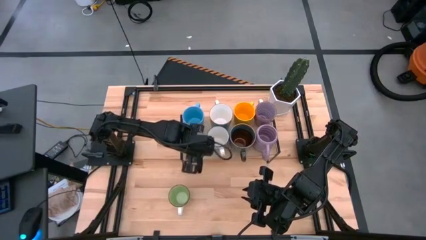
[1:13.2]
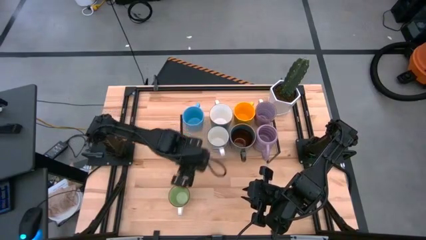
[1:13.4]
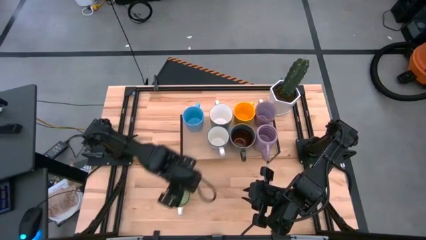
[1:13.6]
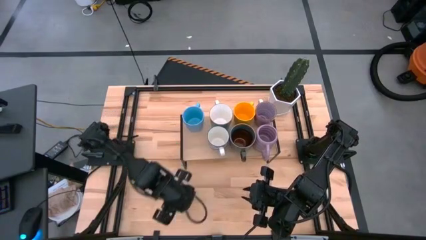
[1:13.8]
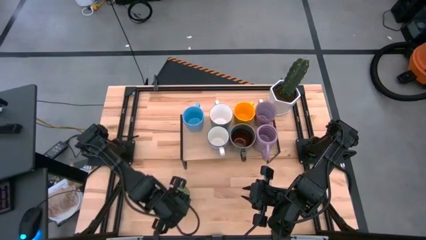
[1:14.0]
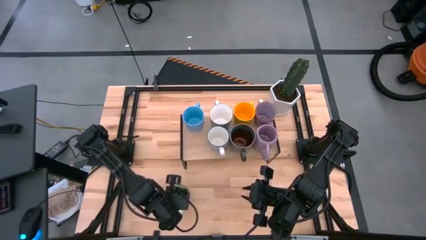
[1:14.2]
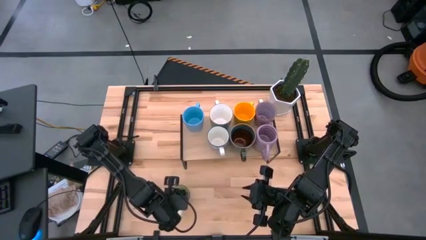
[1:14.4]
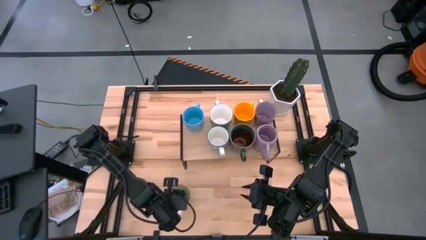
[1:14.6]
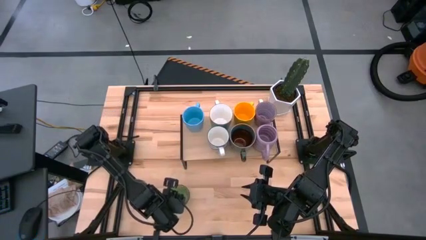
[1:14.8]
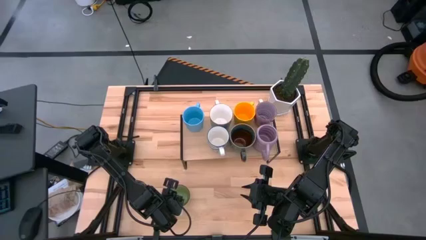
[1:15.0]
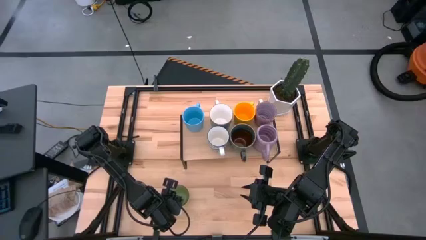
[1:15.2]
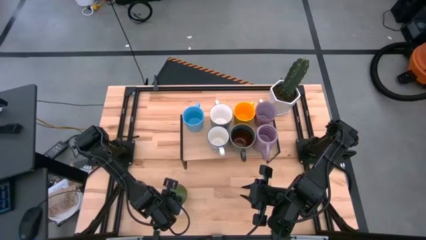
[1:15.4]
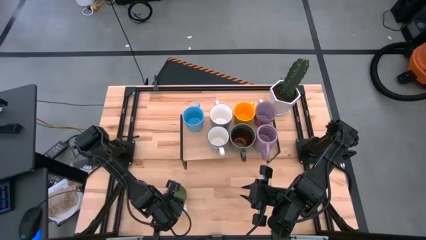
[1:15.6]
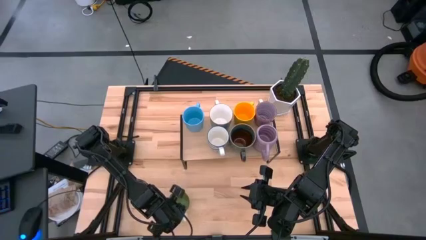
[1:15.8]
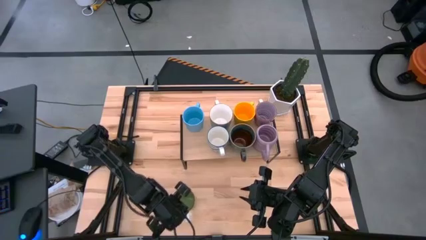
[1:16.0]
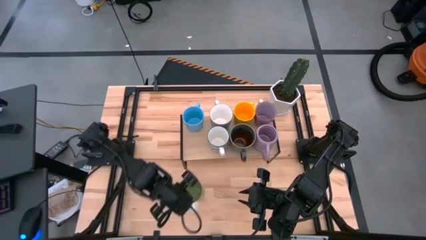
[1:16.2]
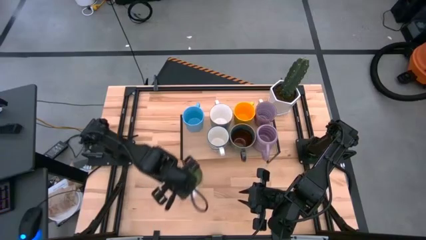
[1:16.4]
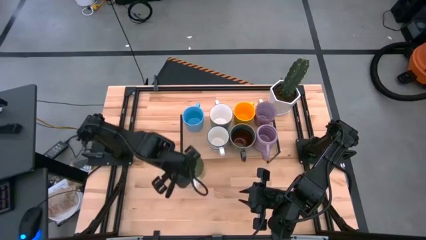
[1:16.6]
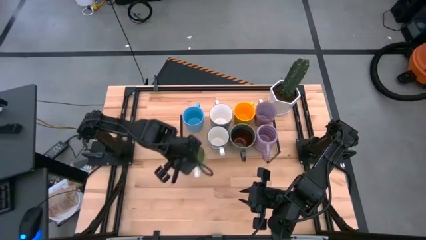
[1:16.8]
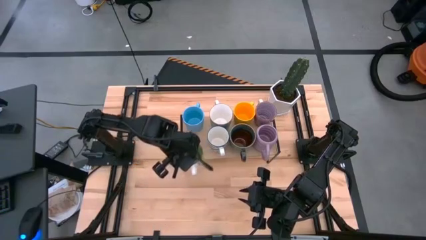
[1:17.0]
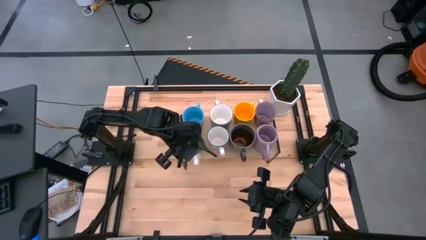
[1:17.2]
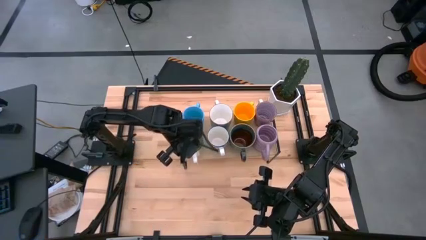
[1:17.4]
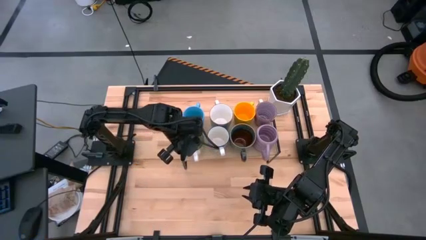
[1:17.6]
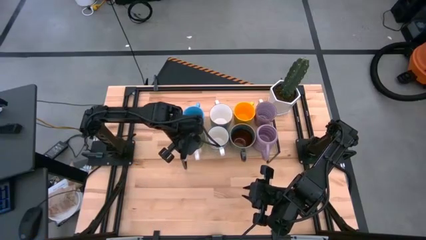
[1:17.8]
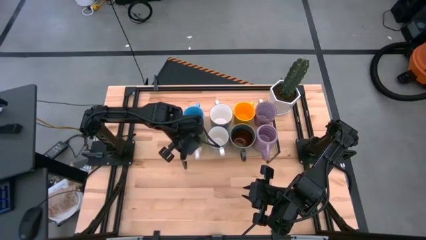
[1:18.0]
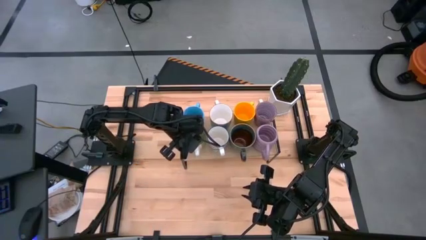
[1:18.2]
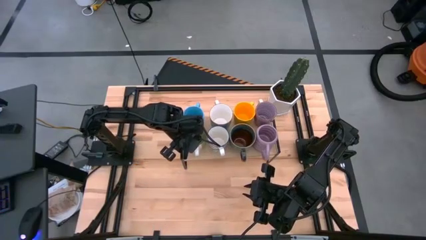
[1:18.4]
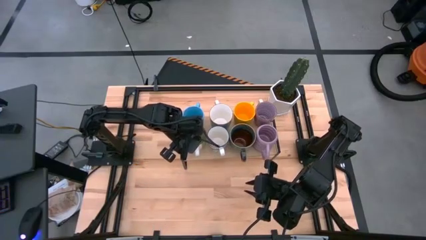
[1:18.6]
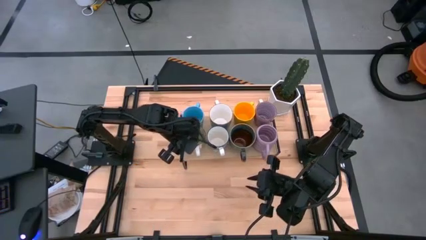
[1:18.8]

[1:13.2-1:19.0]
Task: Place coffee mugs
Put the green mug on the shelf

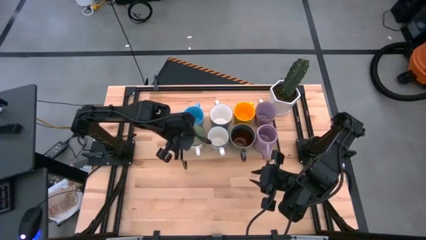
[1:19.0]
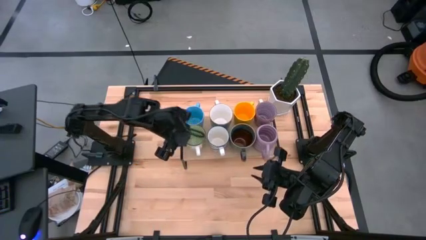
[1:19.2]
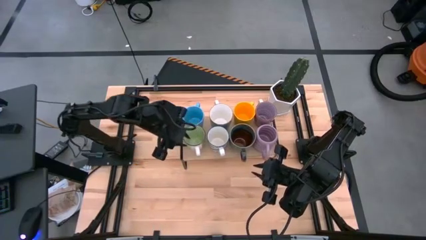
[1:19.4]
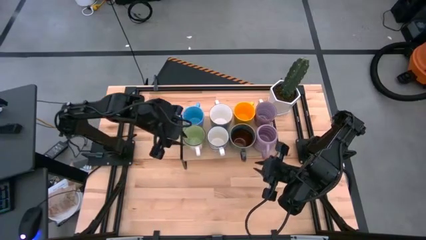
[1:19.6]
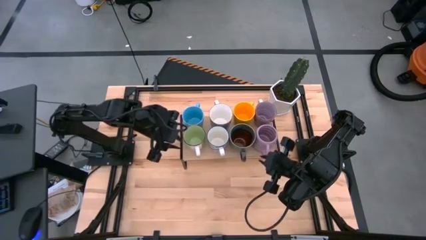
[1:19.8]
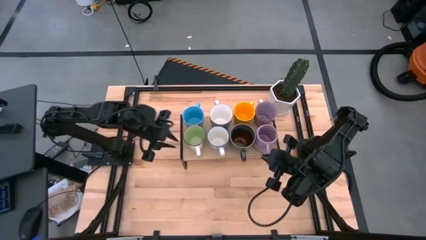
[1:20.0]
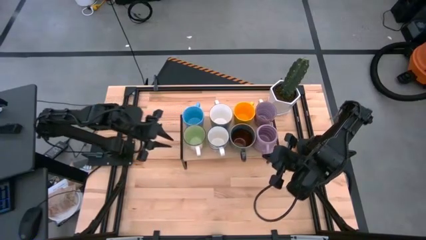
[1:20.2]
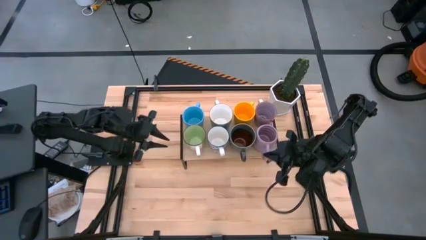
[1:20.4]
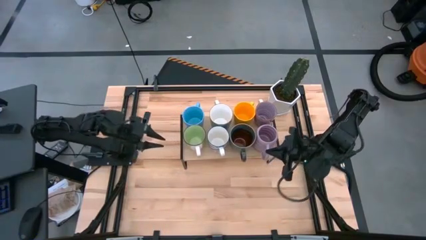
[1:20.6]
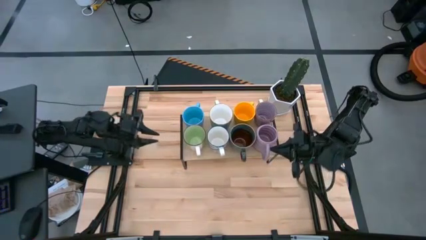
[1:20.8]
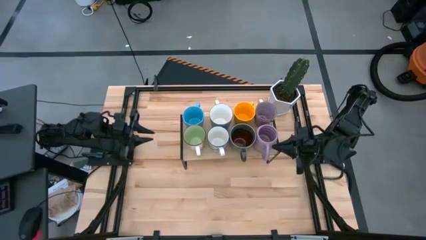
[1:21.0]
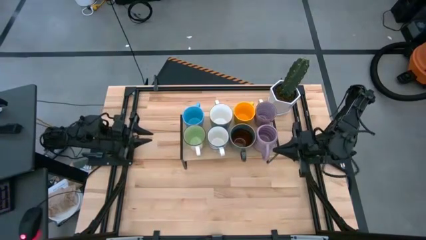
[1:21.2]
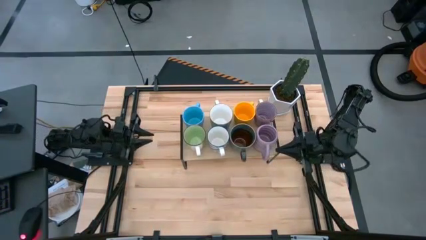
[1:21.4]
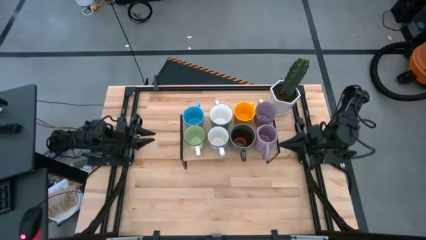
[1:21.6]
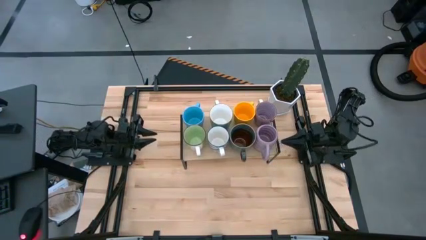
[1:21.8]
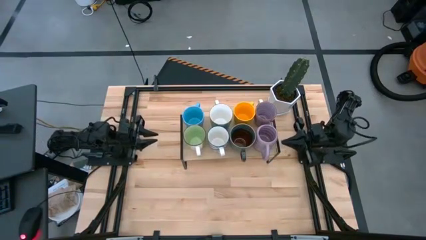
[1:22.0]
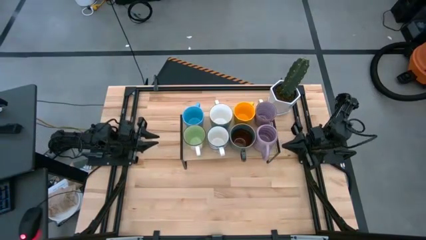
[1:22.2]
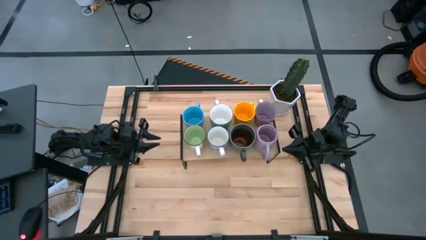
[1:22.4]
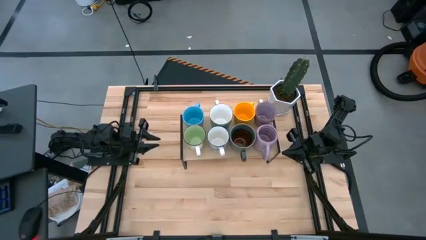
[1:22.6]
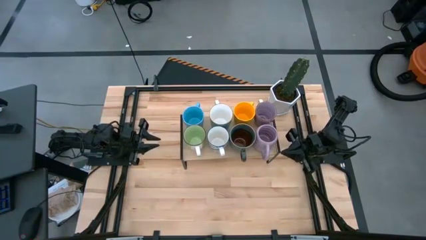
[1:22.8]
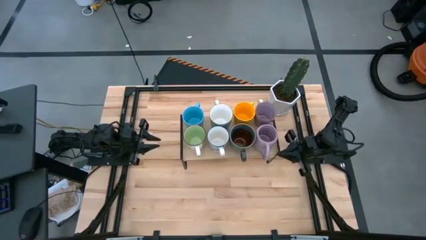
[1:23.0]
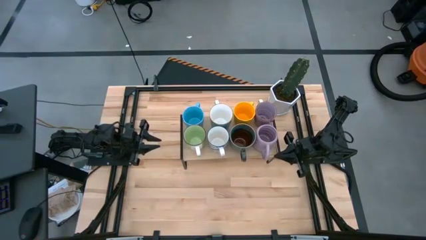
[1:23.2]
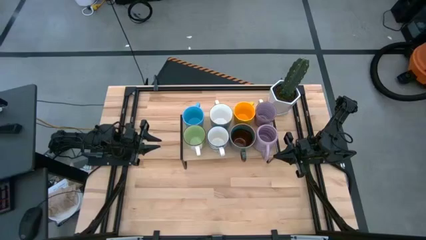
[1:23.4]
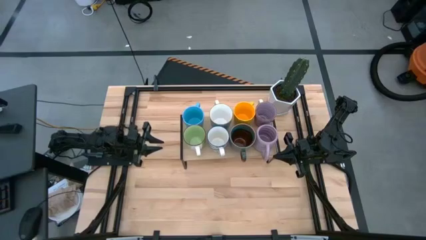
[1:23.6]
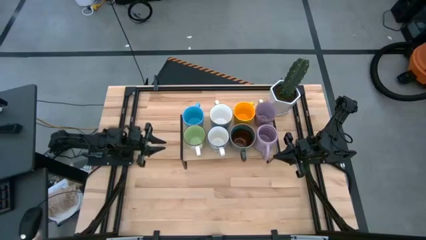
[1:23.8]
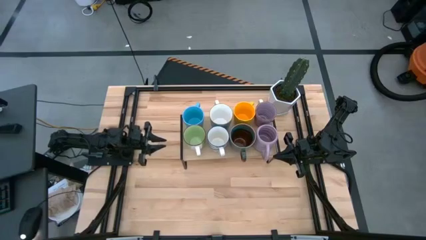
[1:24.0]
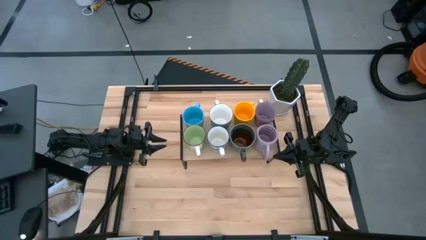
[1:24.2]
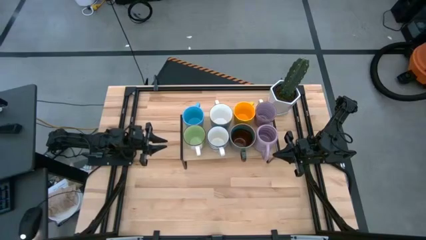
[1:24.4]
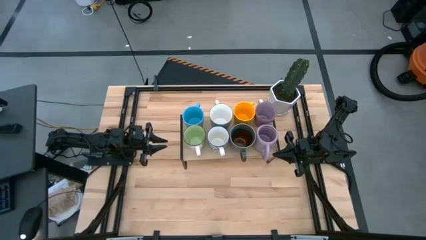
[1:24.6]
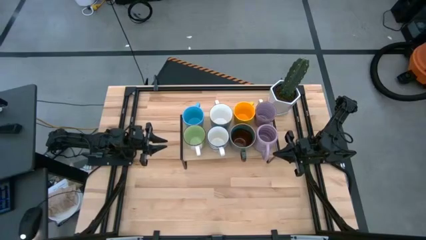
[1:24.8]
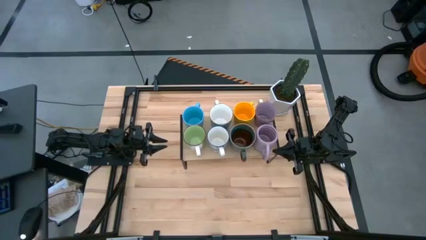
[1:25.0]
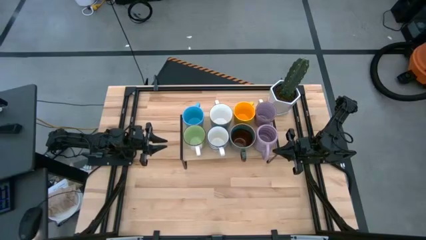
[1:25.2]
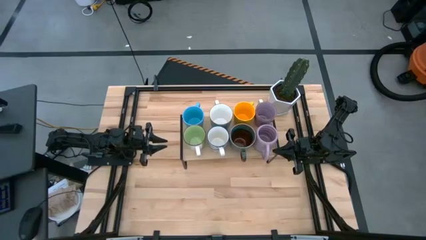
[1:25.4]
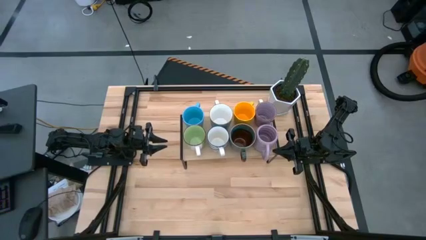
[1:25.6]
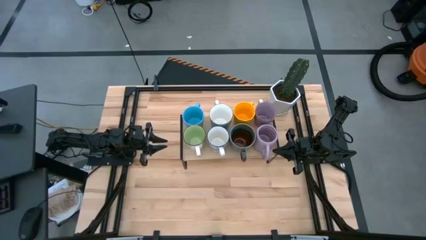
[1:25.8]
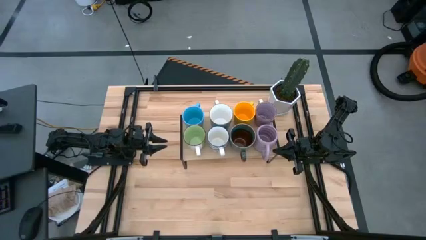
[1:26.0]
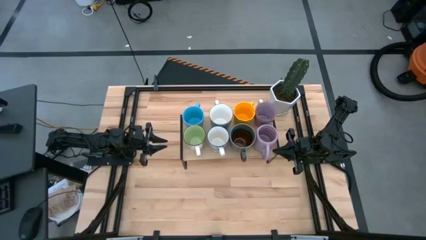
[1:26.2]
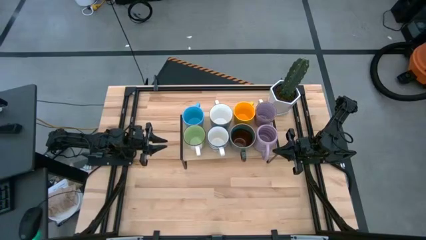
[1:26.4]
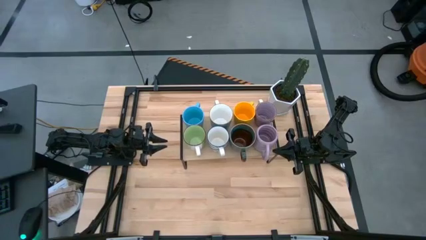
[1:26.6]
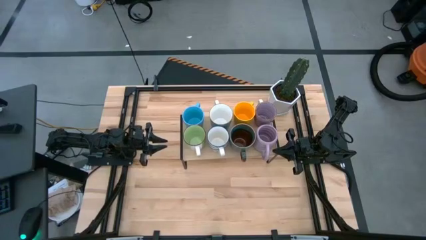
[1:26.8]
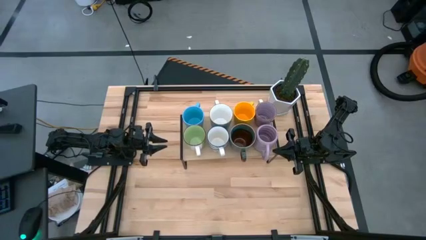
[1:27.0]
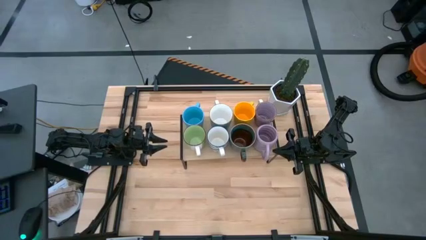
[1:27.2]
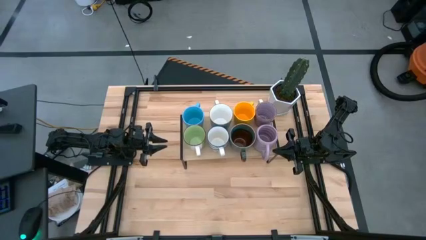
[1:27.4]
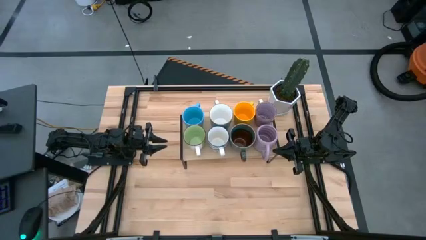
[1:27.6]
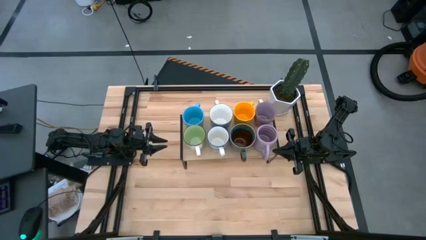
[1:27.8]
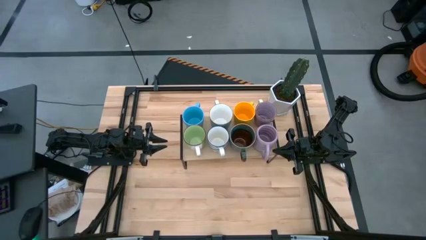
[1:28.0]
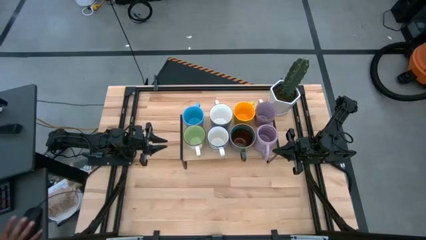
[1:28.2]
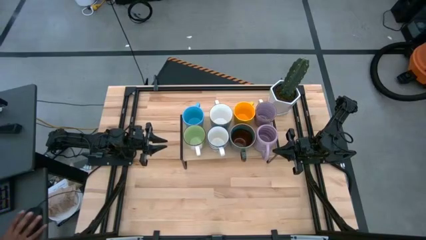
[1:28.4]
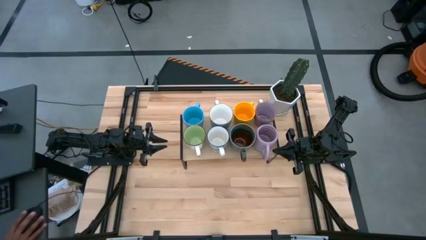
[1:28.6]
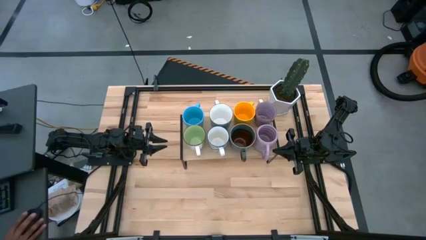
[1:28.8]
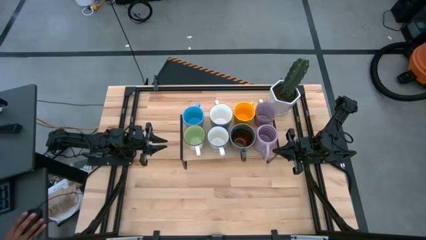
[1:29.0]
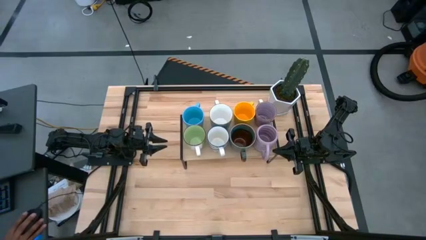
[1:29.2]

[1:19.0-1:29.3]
Return to Home Position
